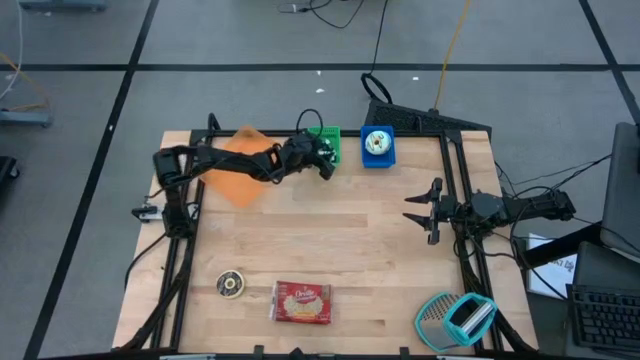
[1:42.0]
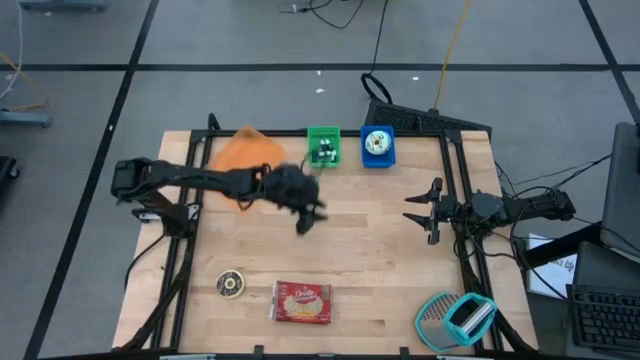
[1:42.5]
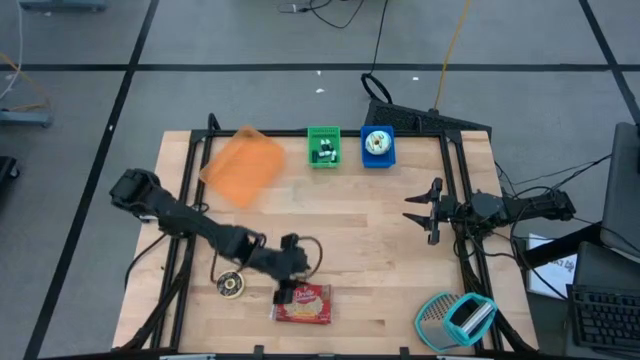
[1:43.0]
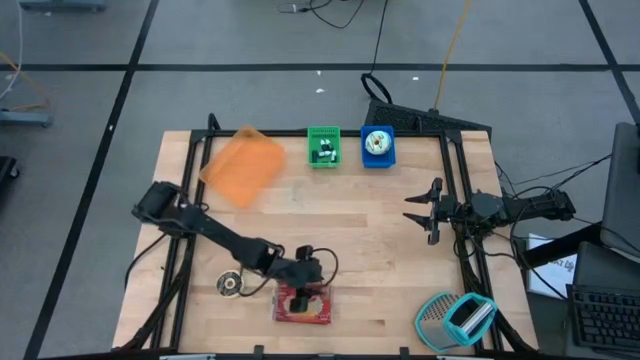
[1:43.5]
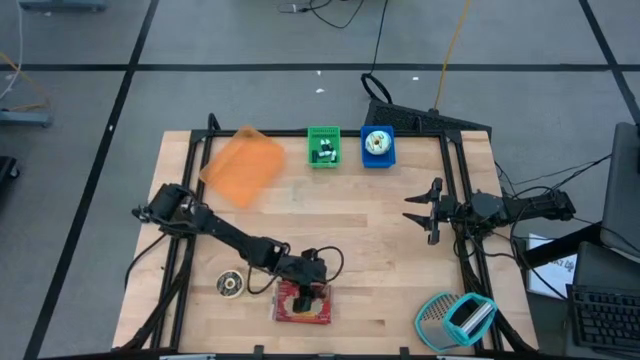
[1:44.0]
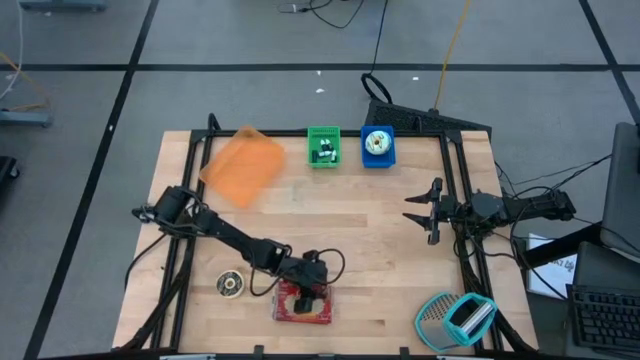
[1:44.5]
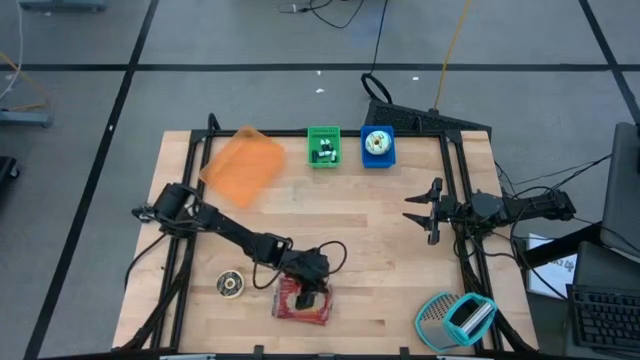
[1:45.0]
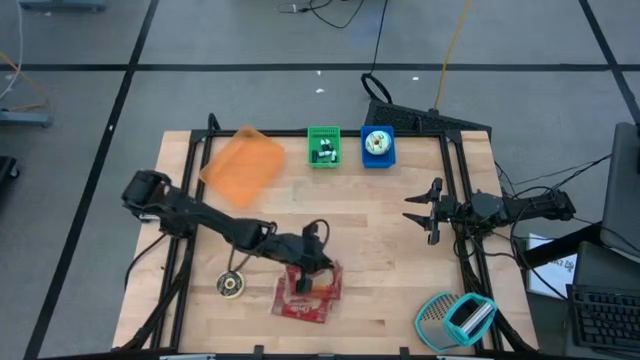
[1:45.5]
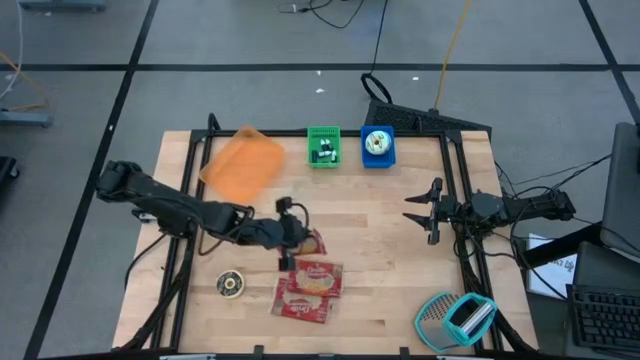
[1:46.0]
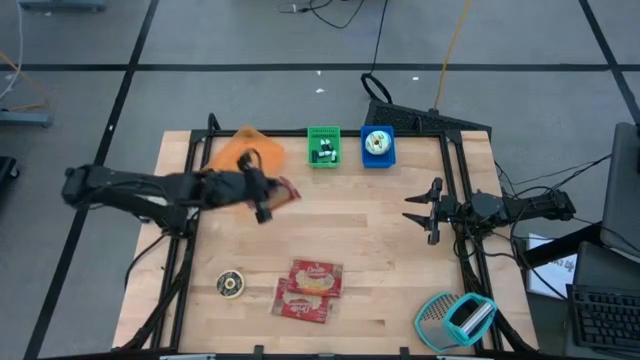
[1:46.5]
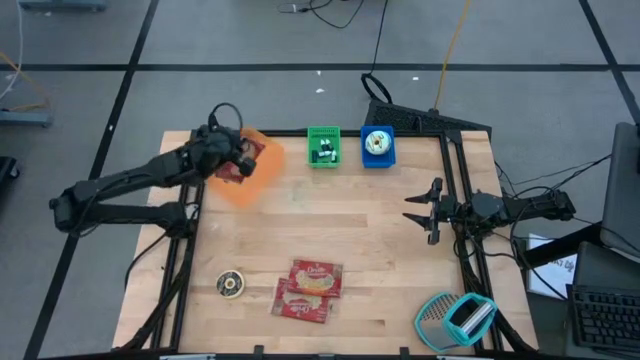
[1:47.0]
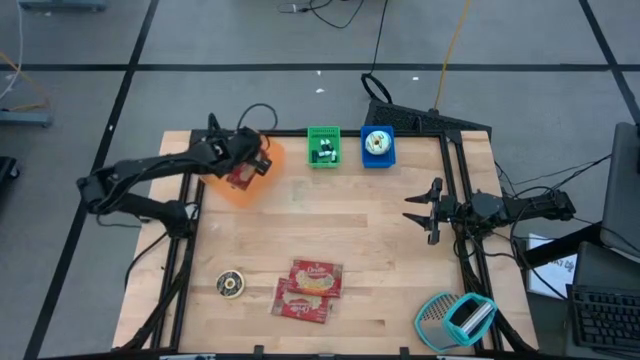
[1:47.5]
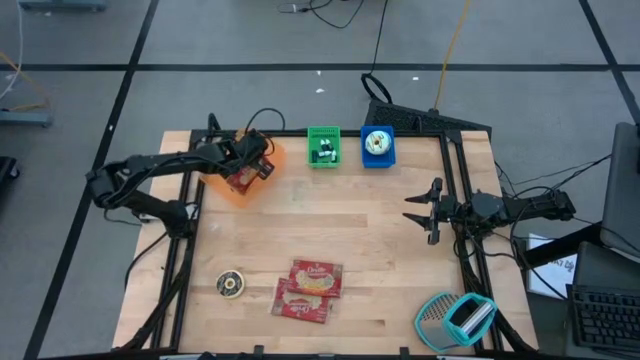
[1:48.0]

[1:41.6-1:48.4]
Put the red popcorn bag into the orange bin

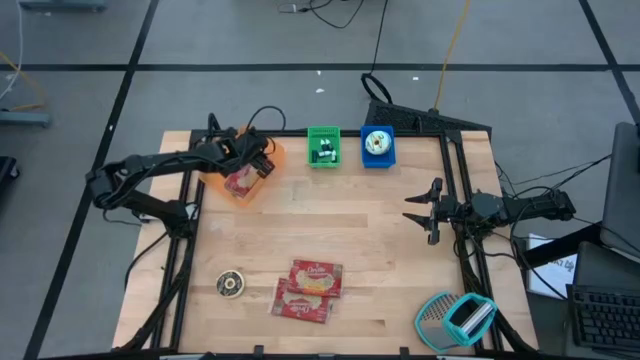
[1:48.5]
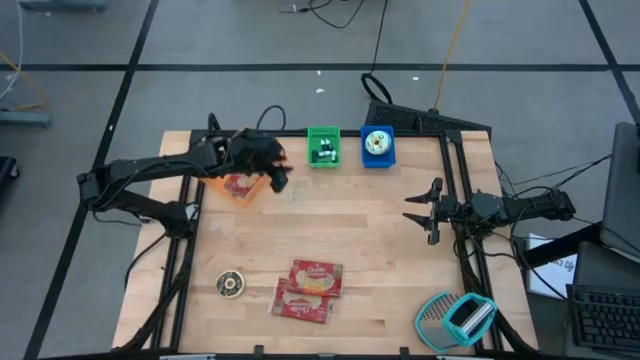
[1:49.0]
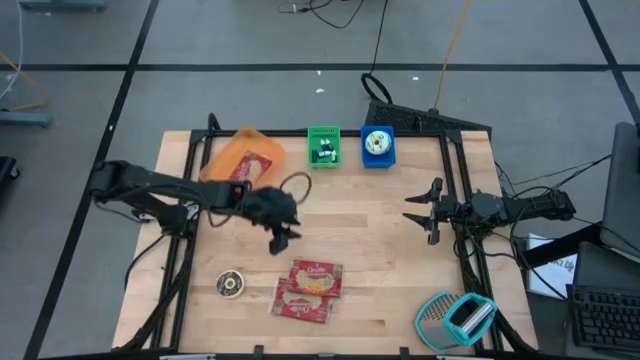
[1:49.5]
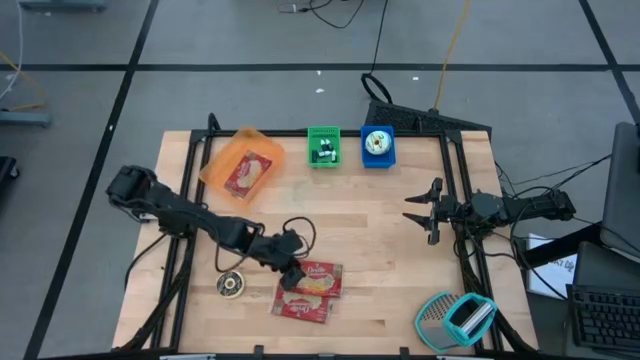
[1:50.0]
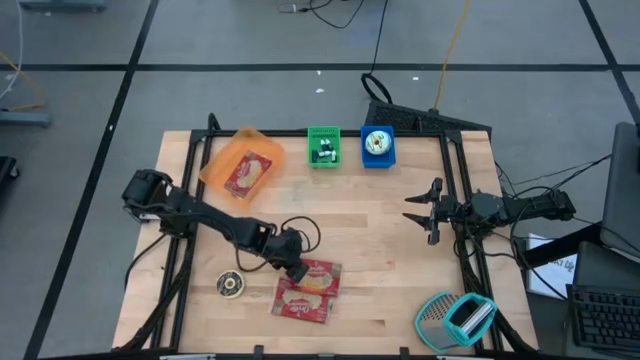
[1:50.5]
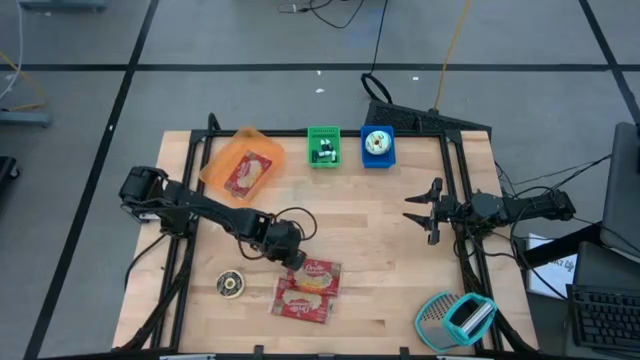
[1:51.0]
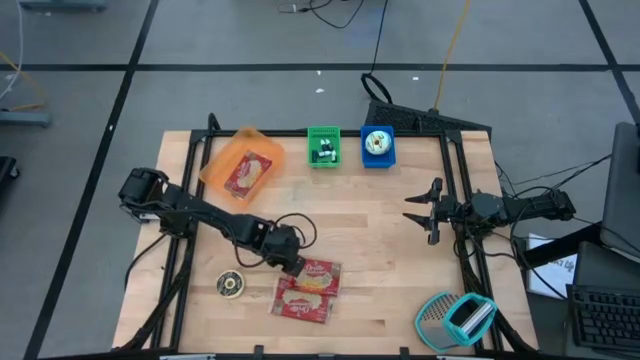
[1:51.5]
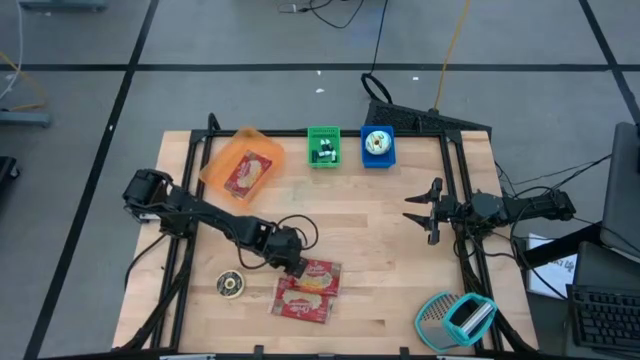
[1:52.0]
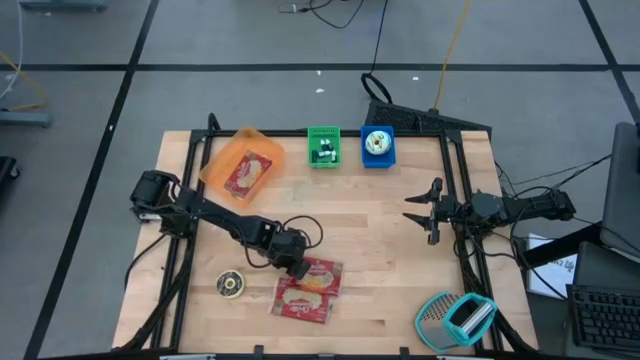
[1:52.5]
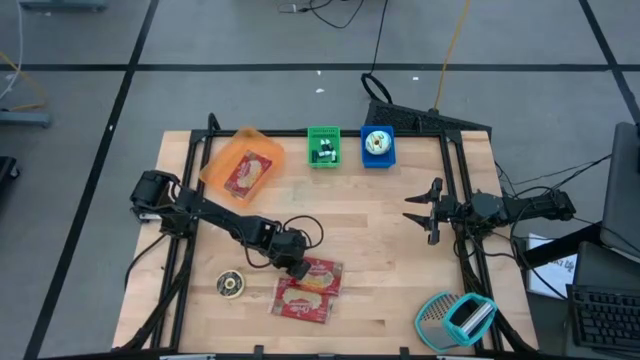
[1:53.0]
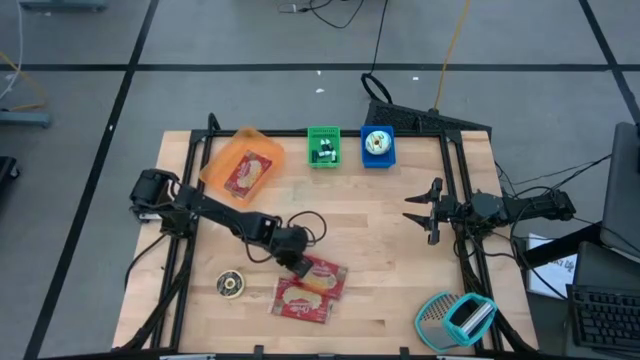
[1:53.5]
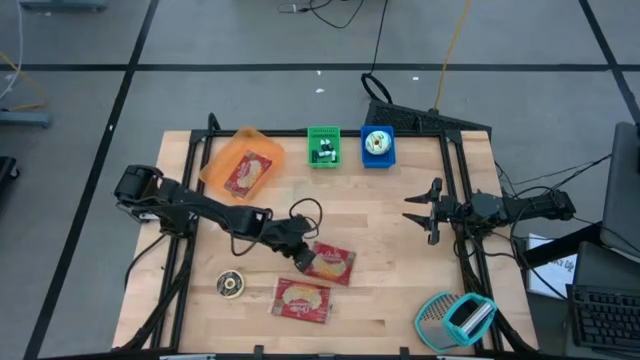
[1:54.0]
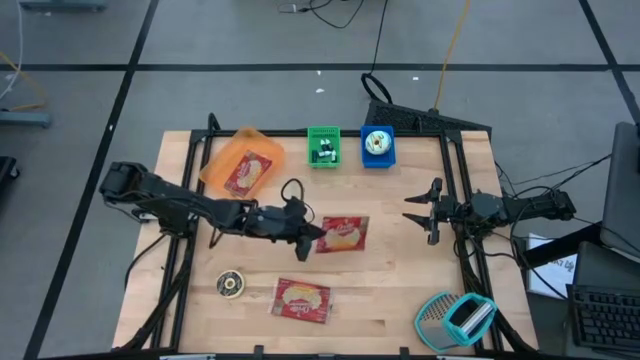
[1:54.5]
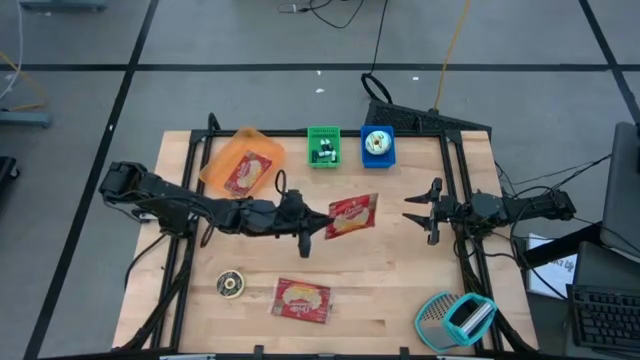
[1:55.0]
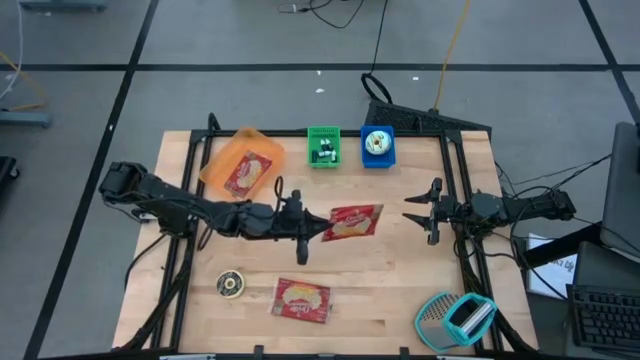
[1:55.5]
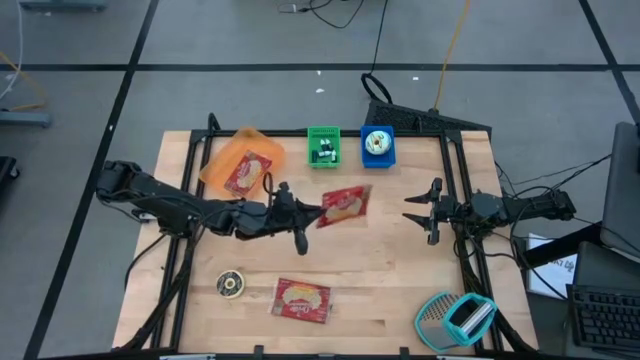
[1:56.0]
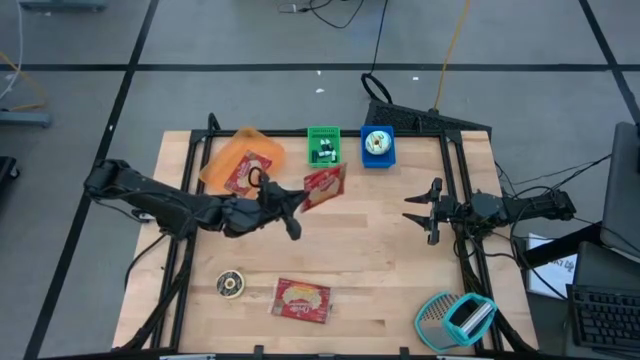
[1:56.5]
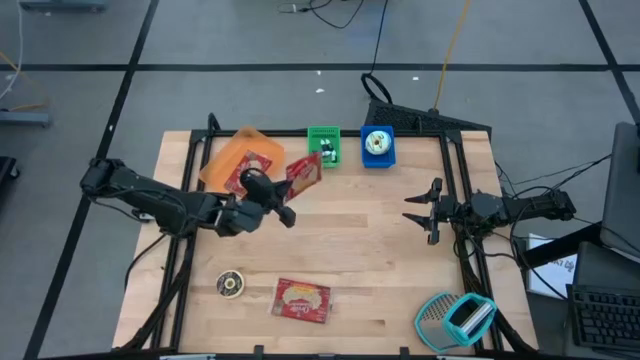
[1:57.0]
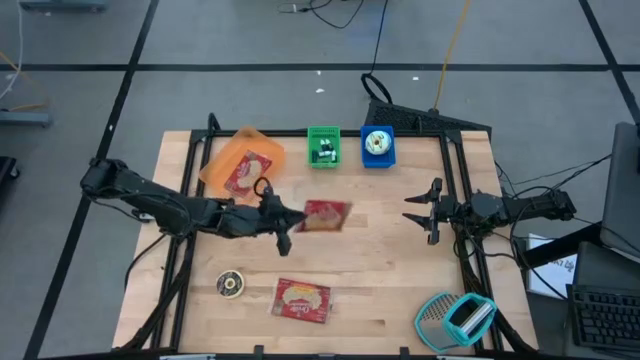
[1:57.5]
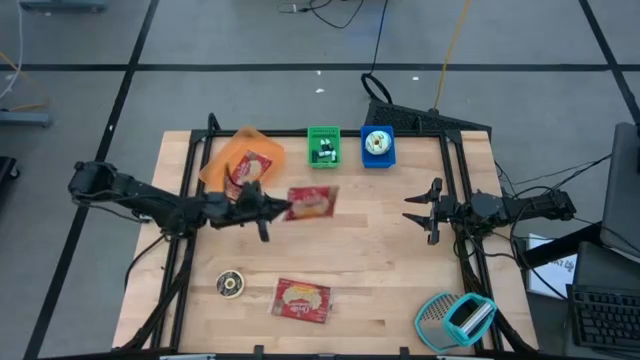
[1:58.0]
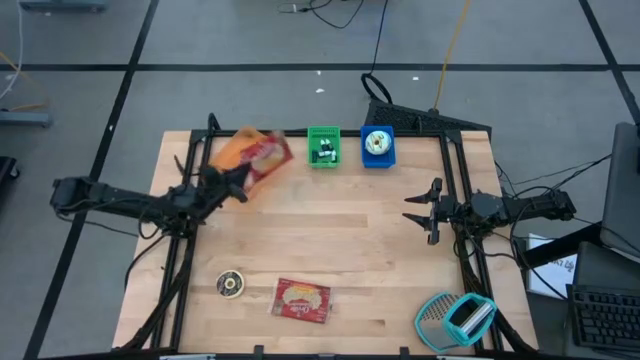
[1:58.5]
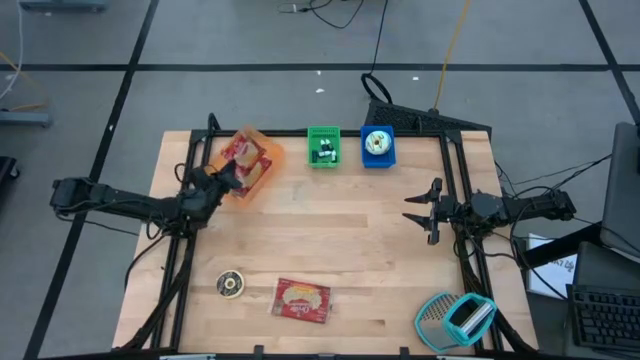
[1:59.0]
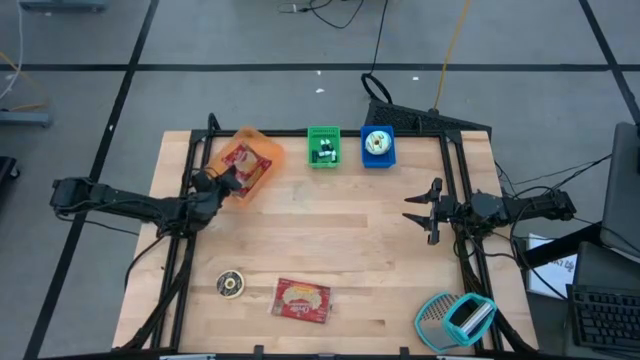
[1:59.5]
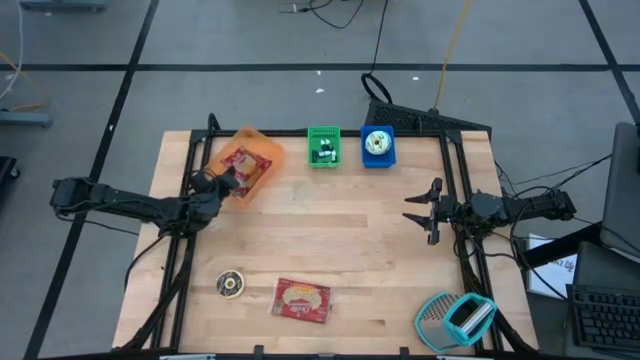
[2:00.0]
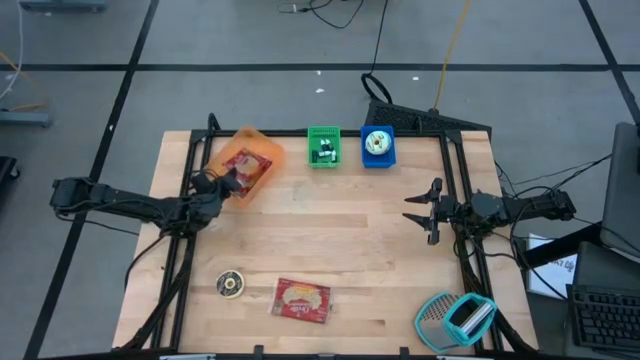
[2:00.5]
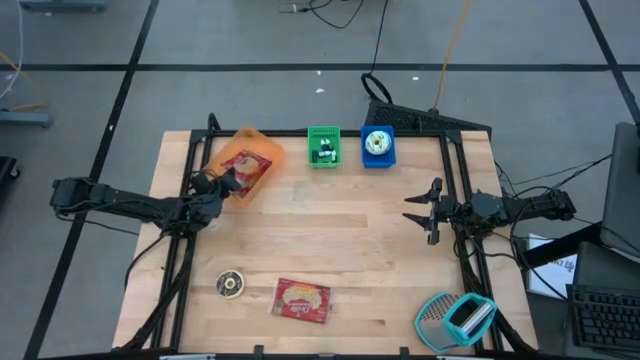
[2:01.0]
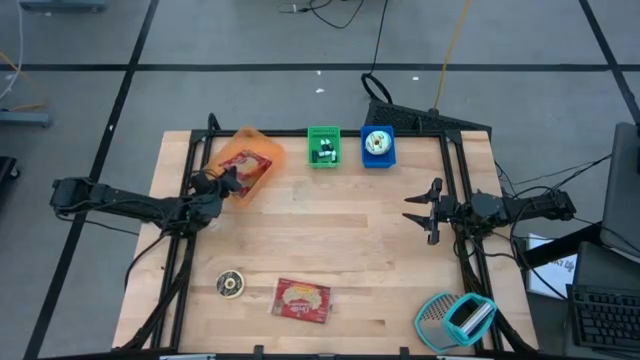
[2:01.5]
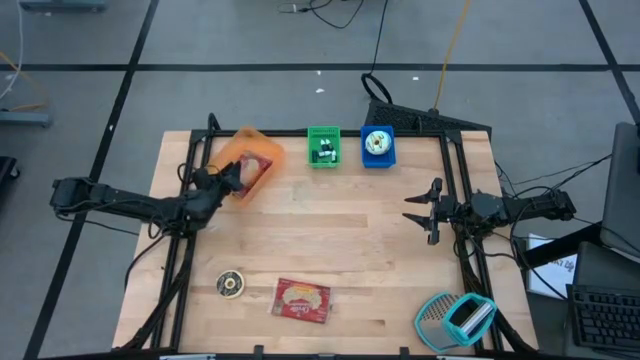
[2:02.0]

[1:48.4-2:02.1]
Put the red popcorn bag into the orange bin
